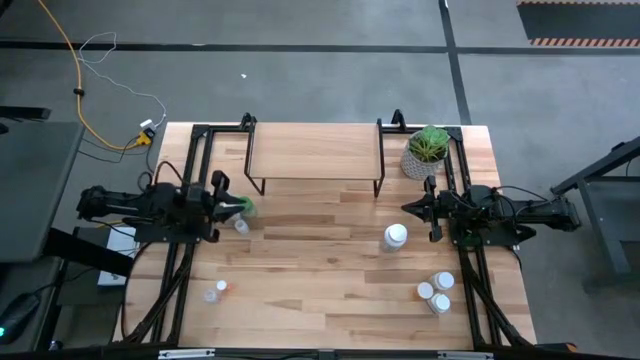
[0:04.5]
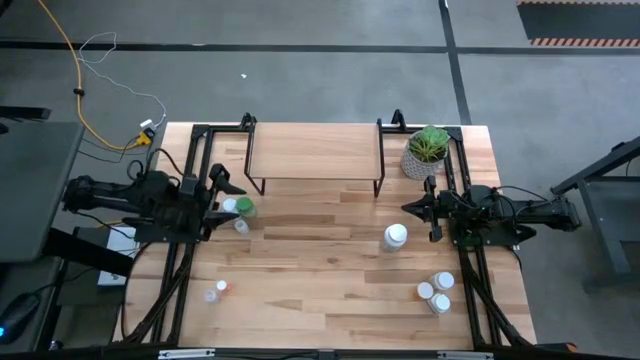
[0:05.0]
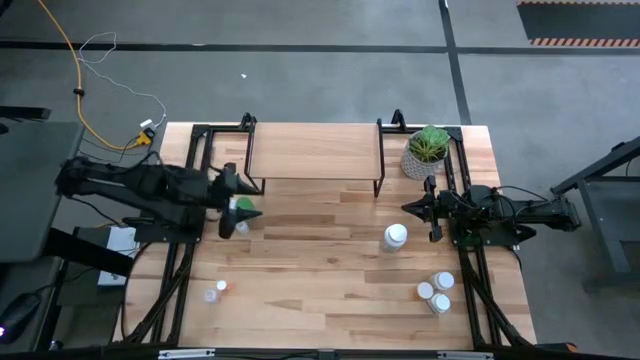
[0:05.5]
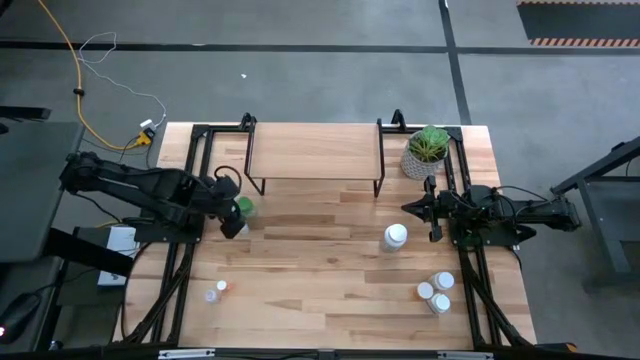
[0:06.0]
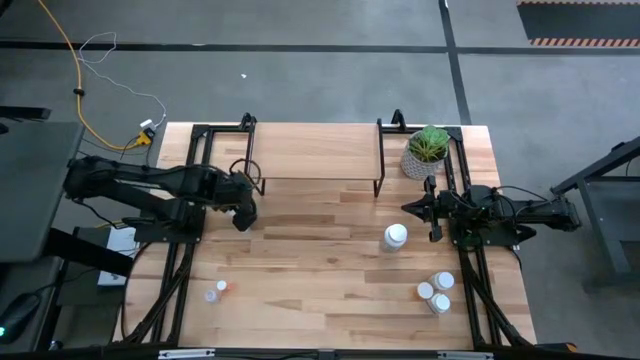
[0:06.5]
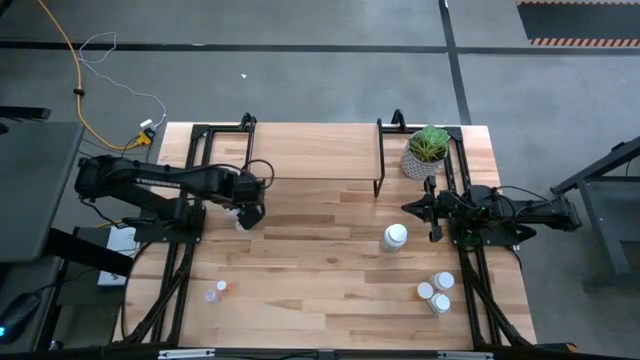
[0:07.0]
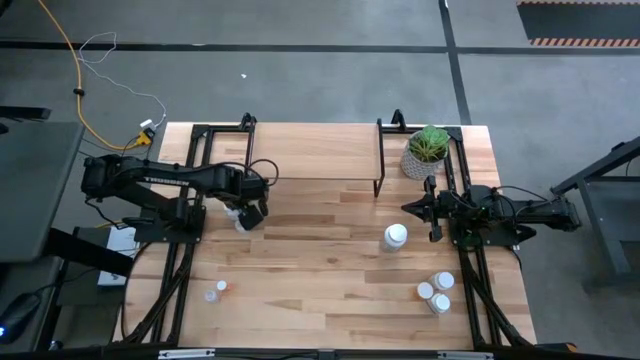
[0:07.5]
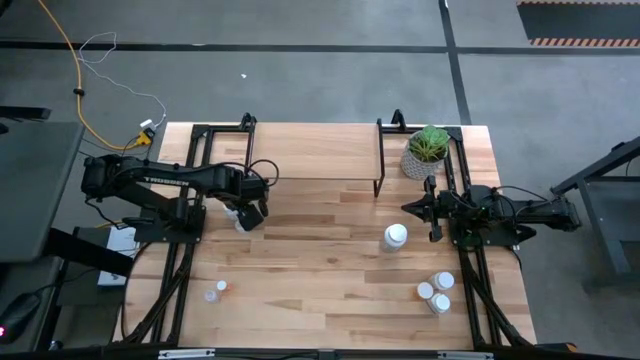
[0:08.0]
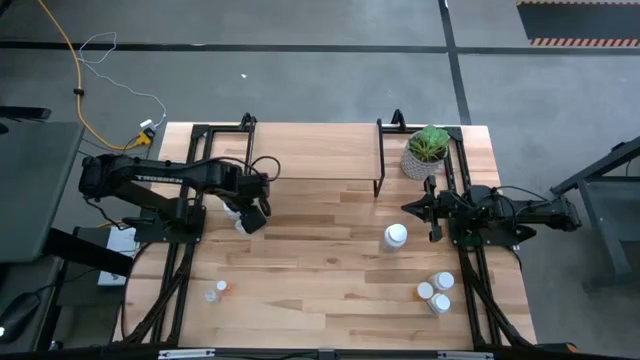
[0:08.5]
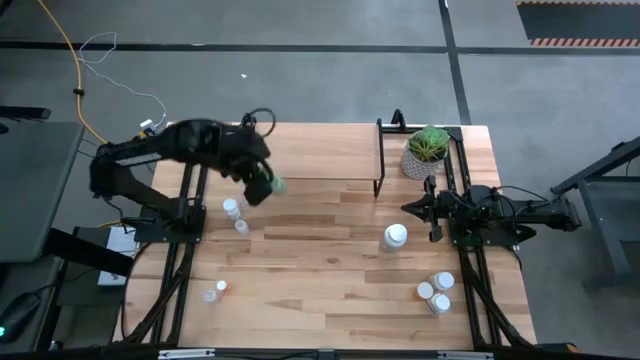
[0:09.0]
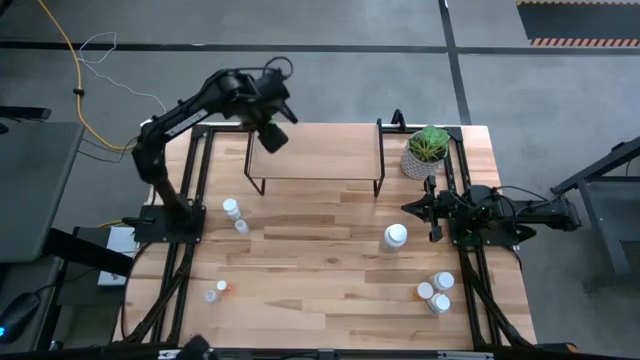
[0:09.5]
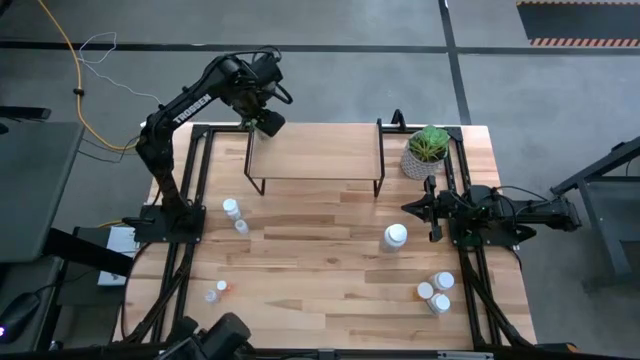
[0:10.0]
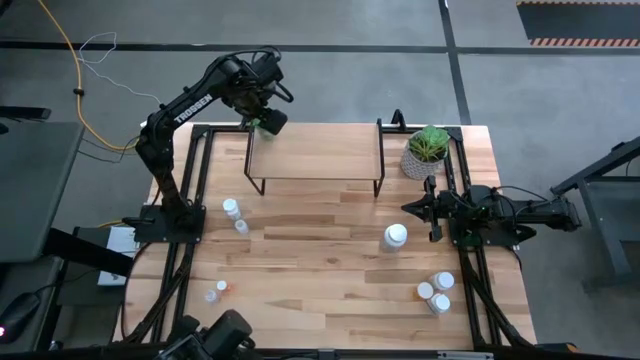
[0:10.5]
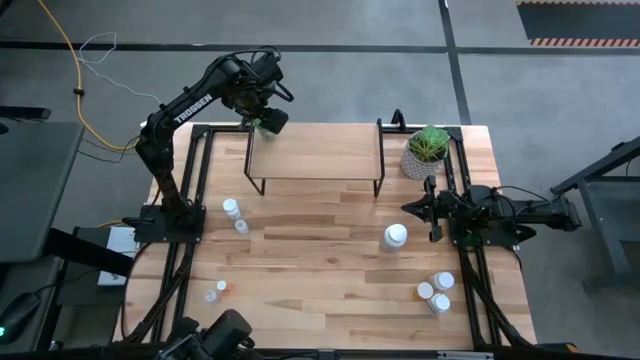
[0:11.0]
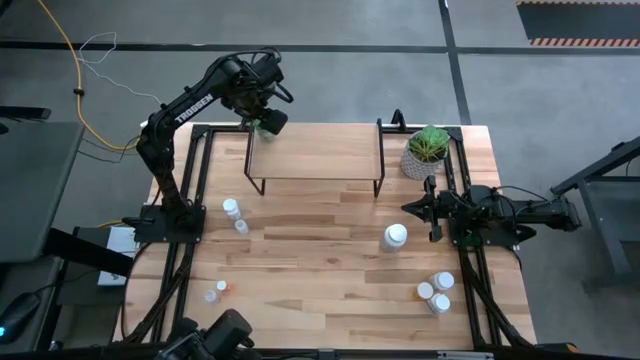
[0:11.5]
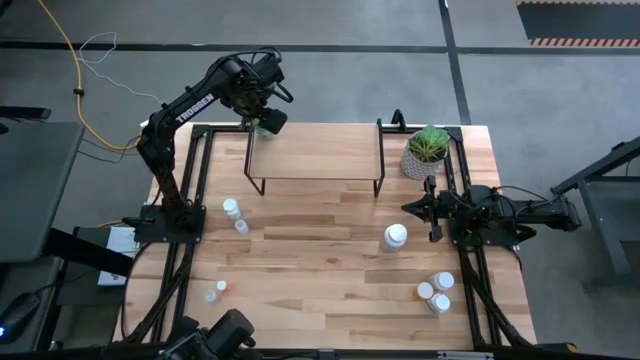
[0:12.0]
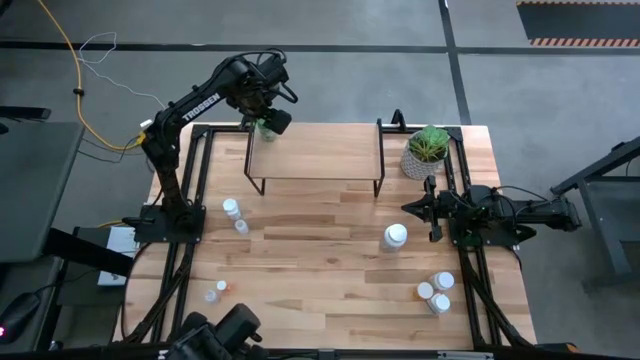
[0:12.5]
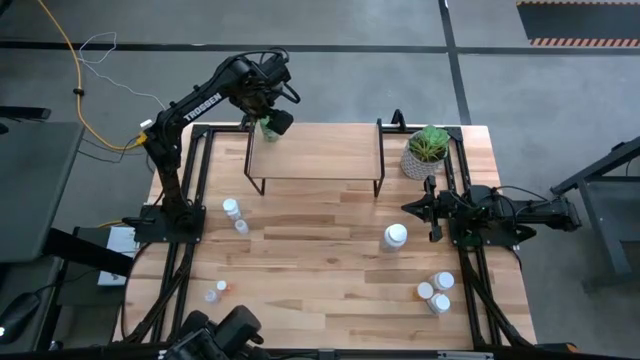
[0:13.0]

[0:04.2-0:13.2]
Task: Pick and place medicine bottles onto shelf by color
Put the green bottle on the shelf

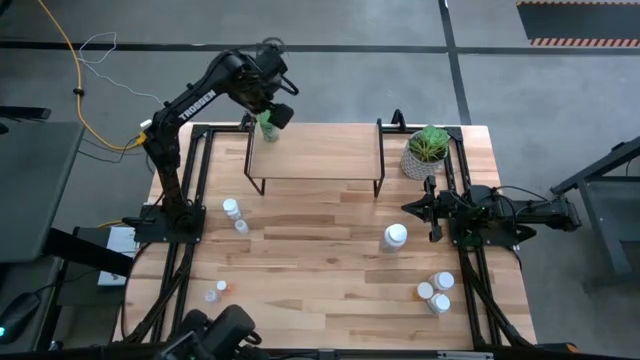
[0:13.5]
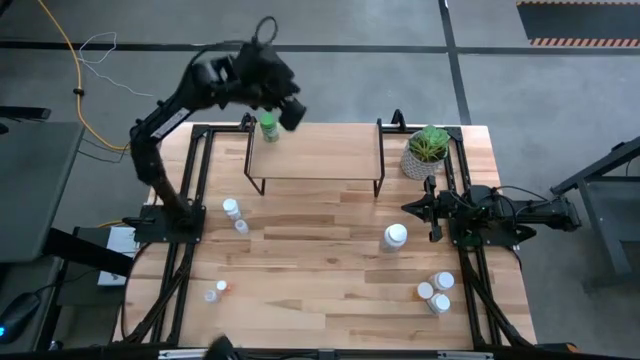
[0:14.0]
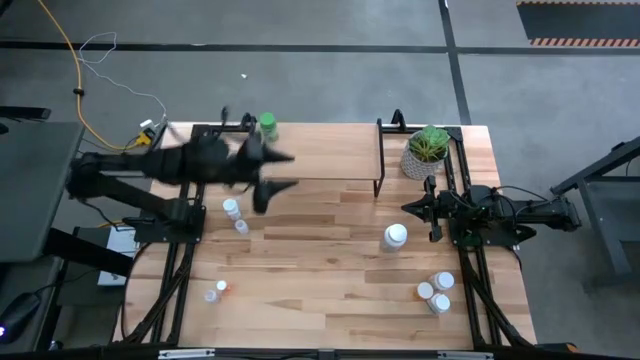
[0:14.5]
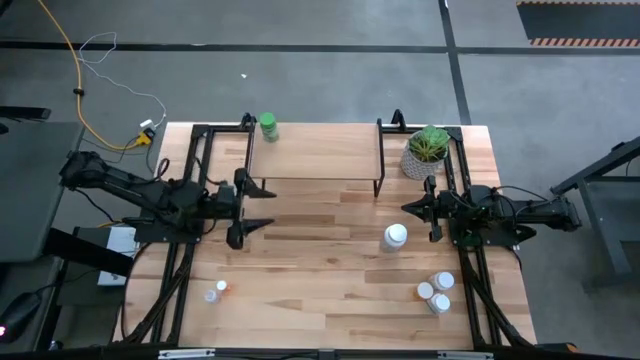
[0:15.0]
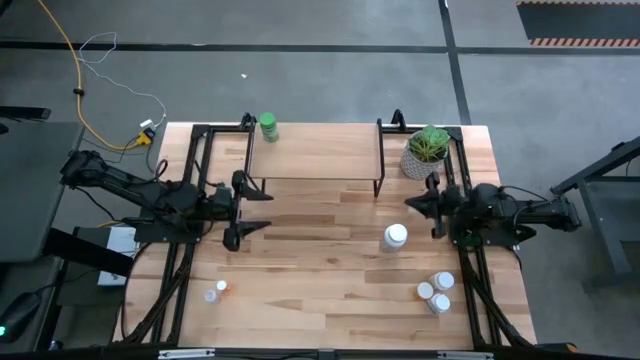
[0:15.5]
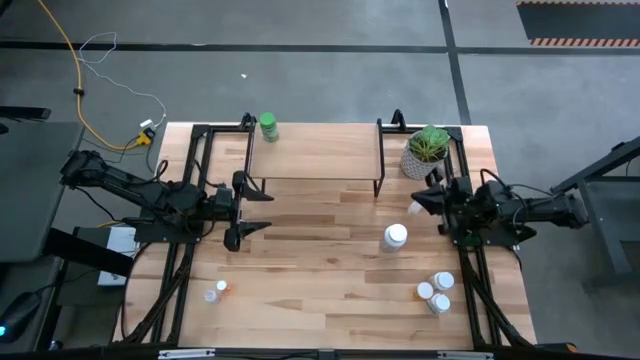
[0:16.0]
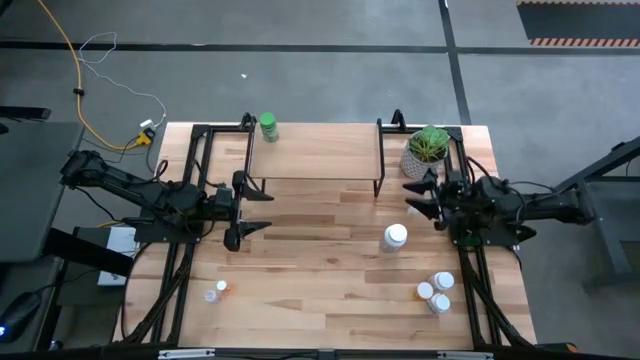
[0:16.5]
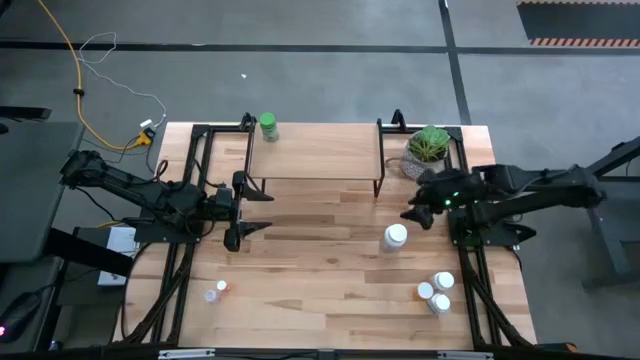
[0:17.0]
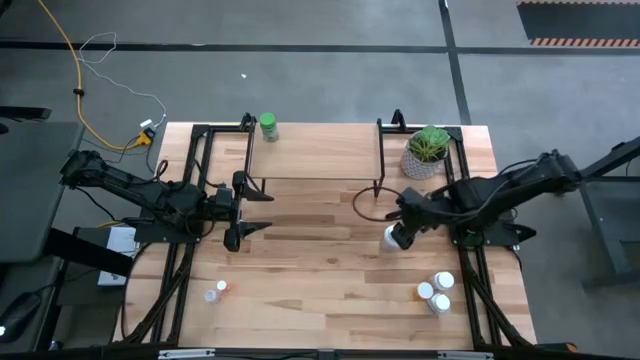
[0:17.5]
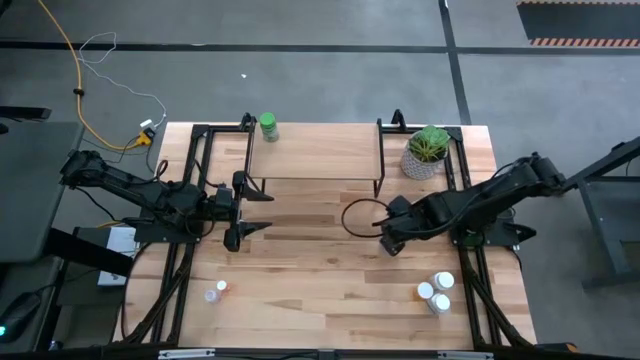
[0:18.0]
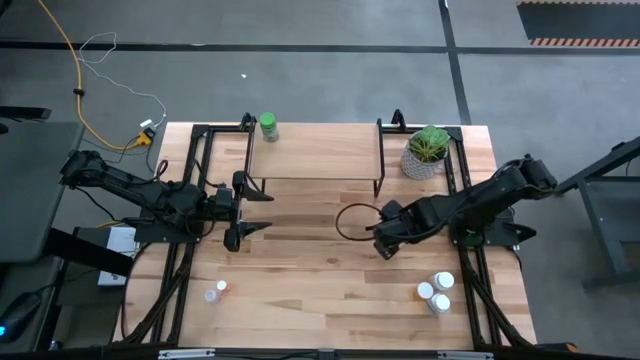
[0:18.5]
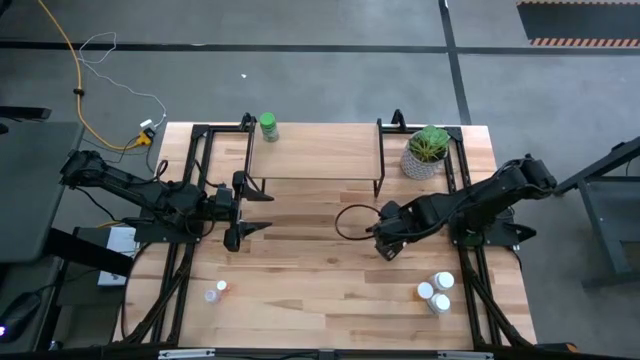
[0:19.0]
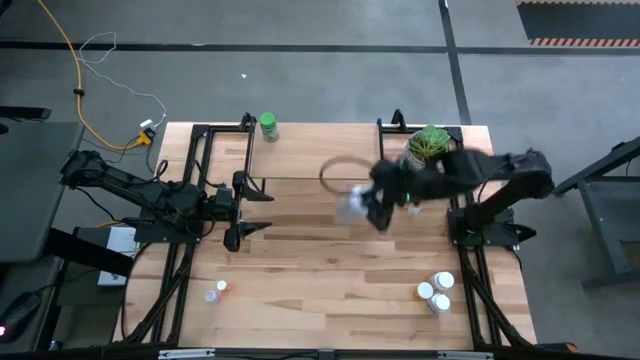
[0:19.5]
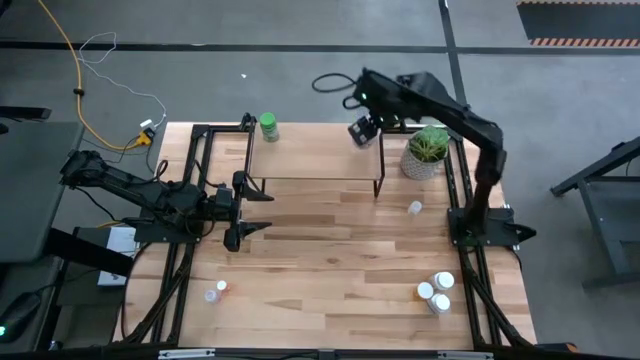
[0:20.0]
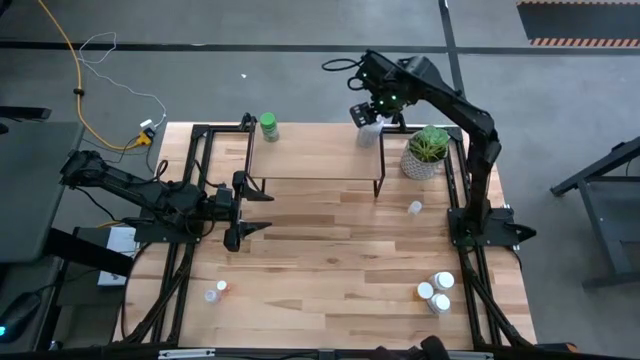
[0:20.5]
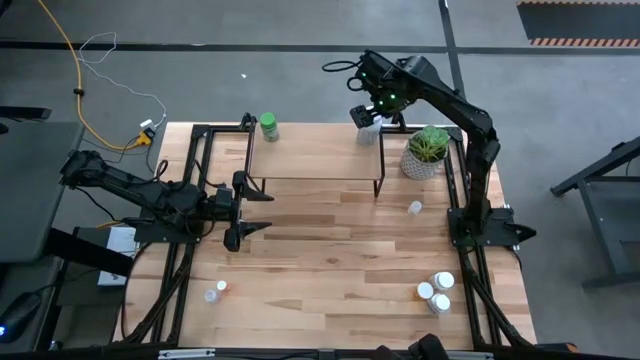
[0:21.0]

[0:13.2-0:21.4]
Put the white and red bottle on the shelf

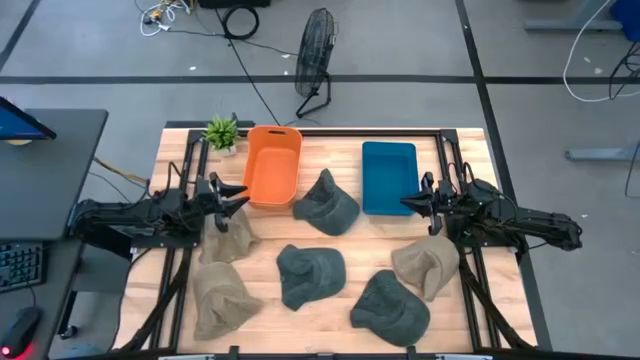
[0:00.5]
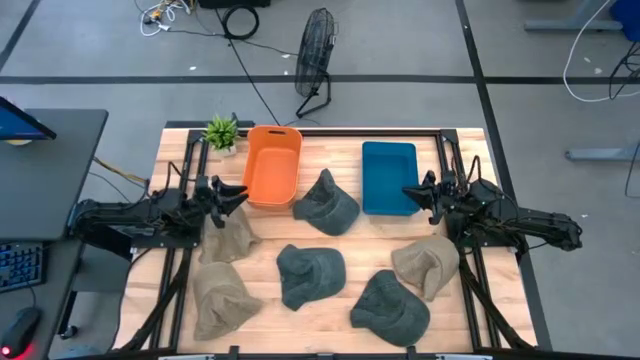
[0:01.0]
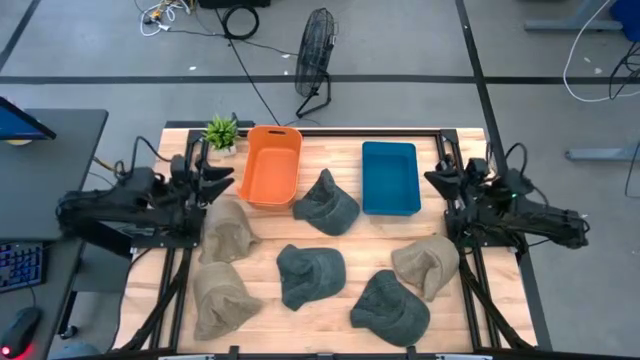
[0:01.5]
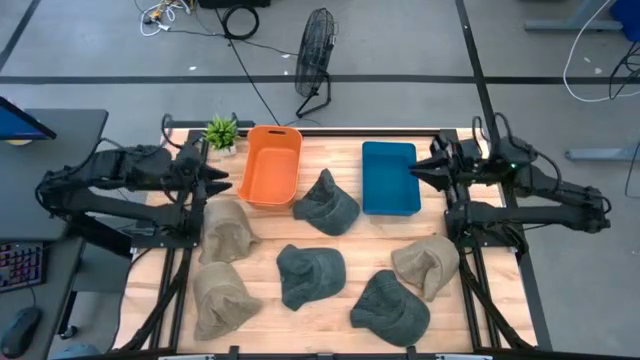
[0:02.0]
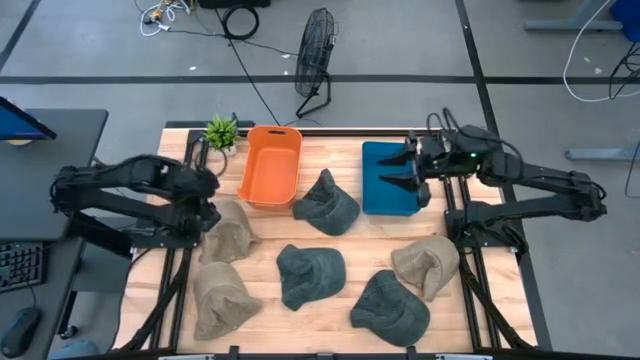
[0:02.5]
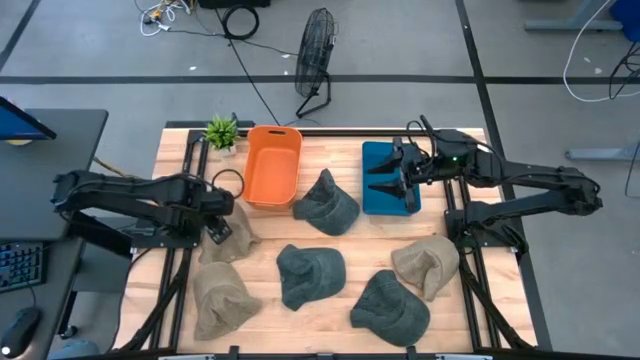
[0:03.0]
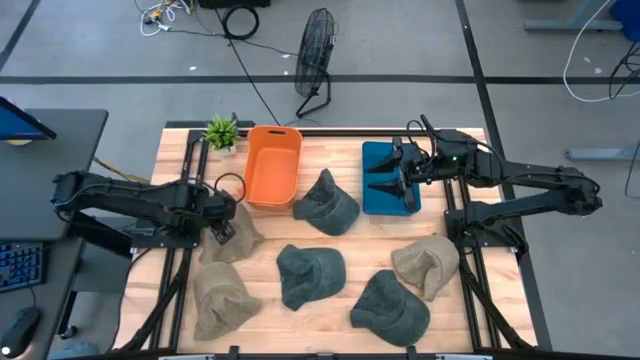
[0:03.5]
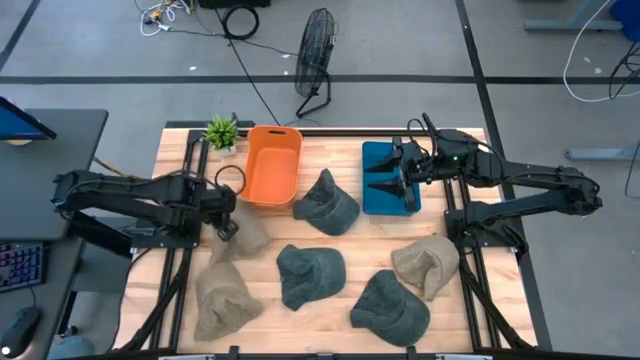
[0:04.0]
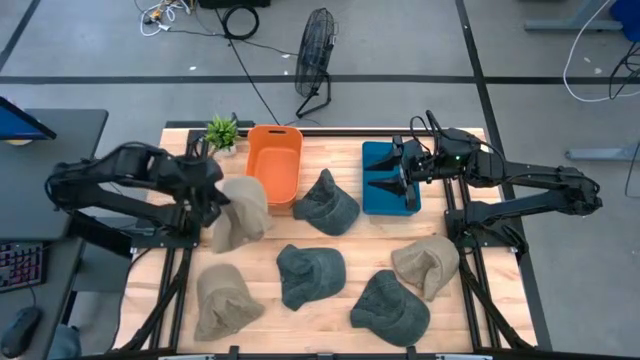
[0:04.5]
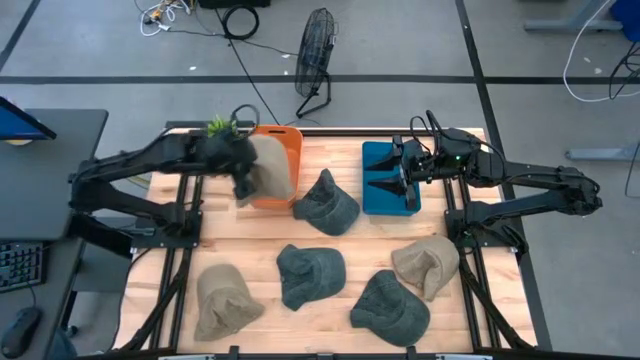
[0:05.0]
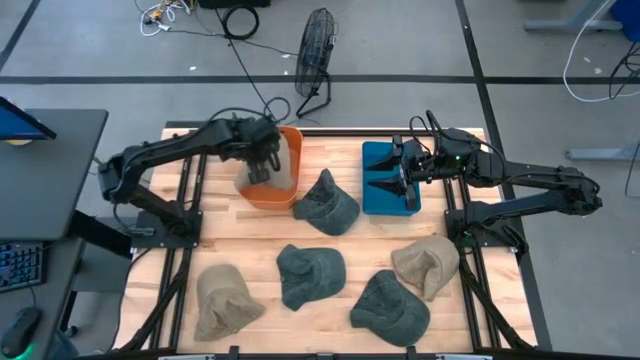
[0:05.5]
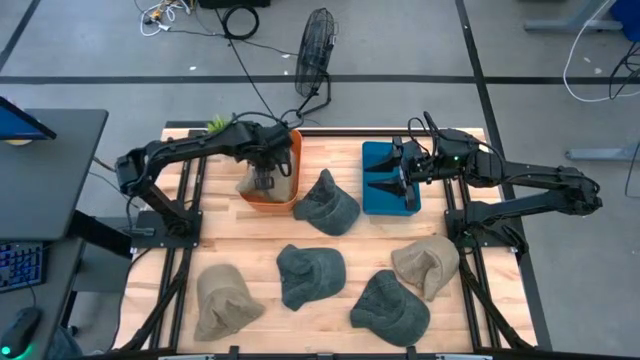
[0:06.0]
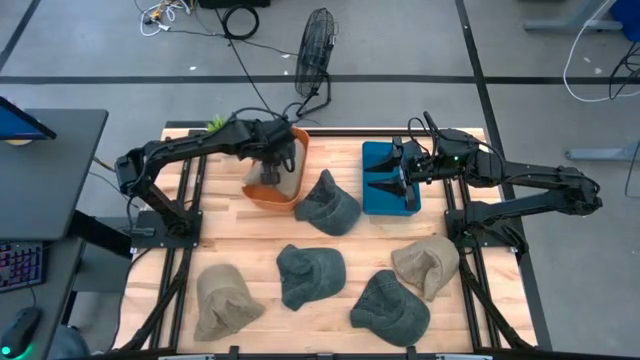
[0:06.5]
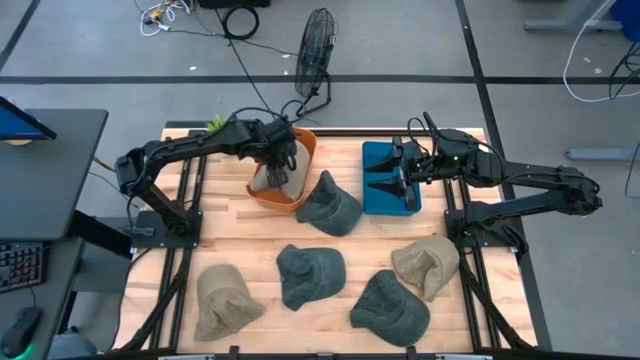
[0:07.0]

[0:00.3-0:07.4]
Task: Pick & Place hat
Put the top left brown cap into the orange bin
